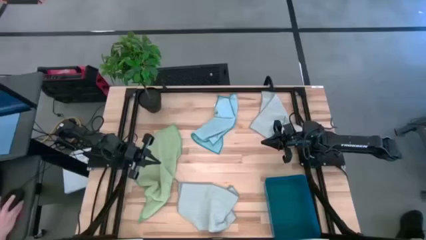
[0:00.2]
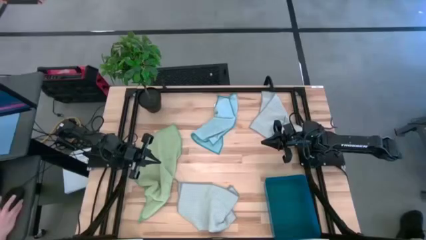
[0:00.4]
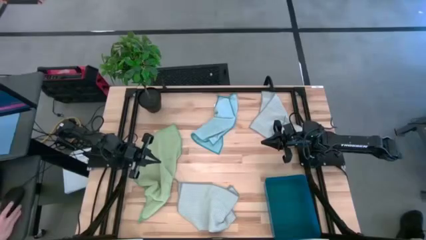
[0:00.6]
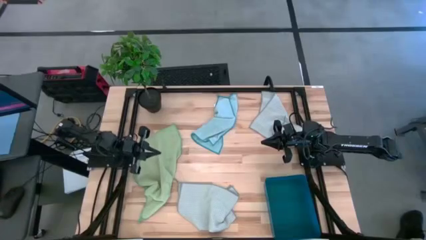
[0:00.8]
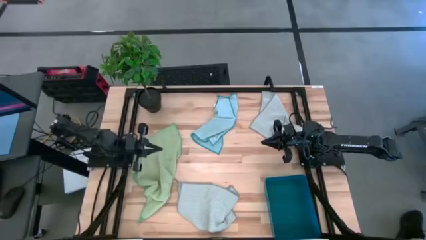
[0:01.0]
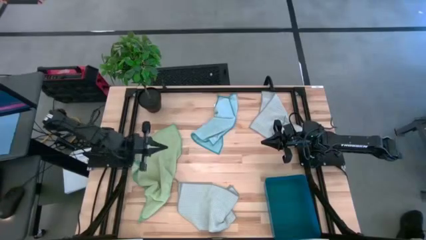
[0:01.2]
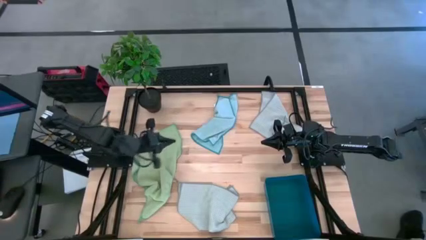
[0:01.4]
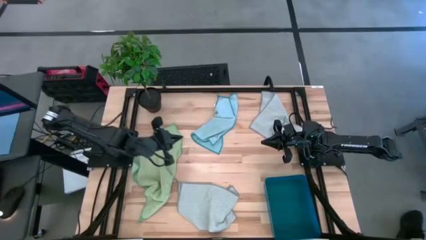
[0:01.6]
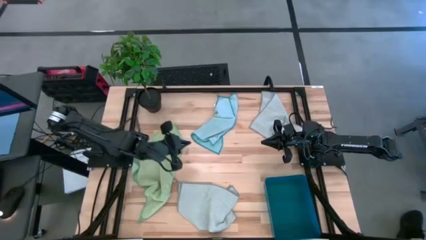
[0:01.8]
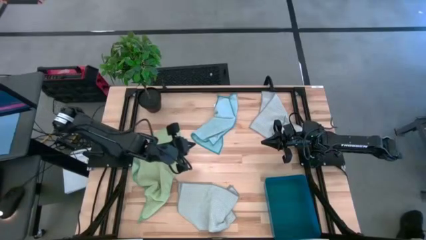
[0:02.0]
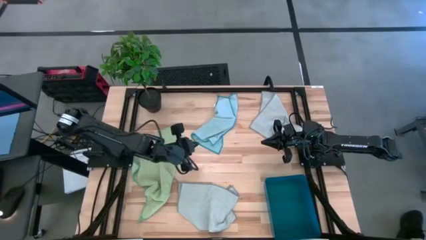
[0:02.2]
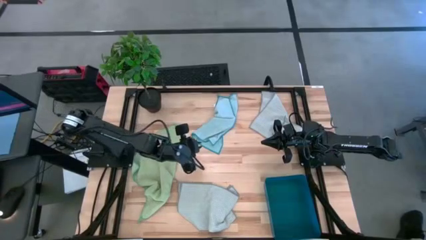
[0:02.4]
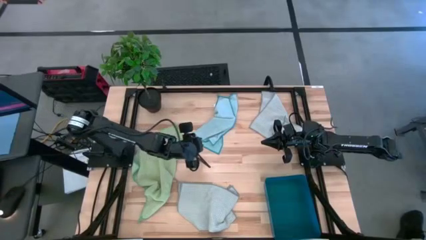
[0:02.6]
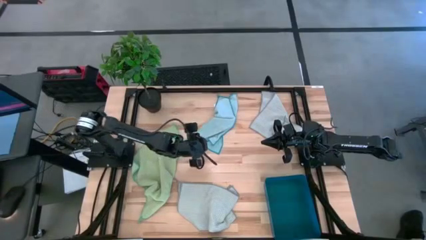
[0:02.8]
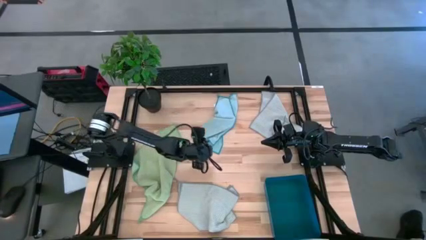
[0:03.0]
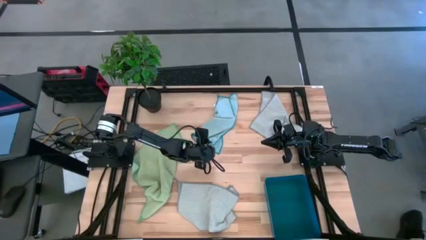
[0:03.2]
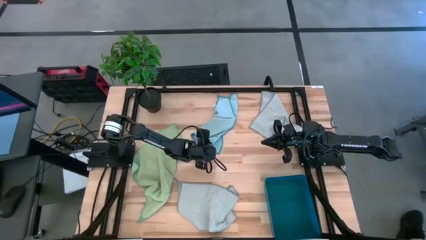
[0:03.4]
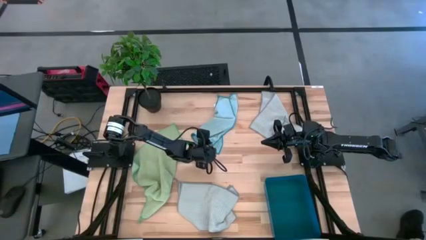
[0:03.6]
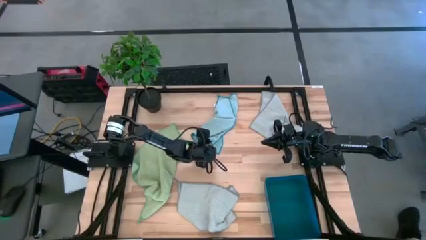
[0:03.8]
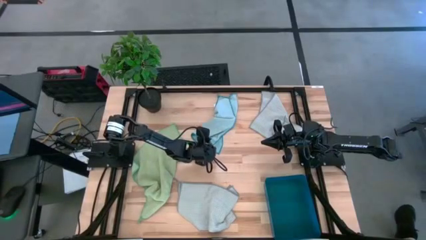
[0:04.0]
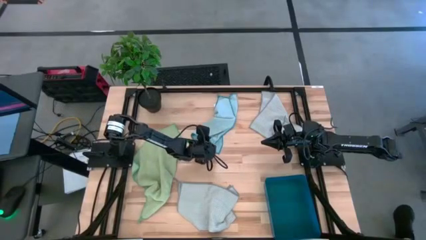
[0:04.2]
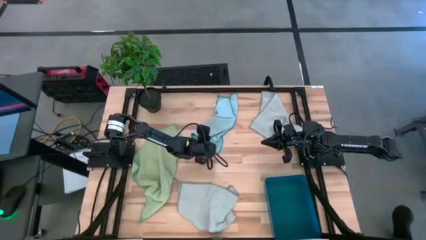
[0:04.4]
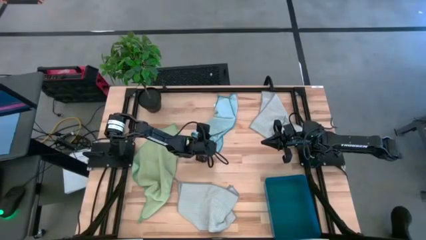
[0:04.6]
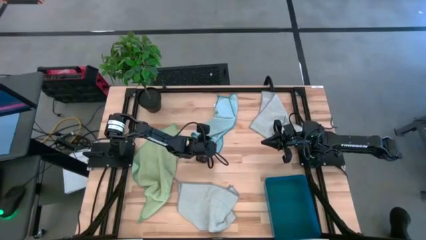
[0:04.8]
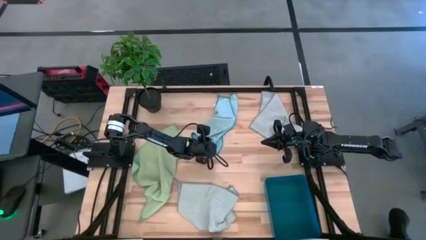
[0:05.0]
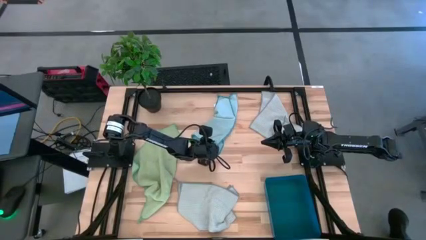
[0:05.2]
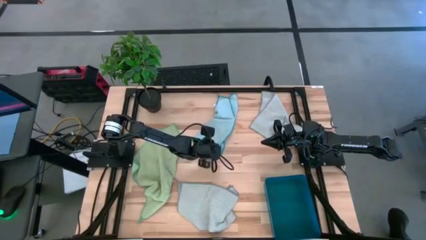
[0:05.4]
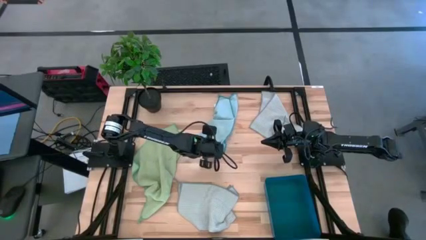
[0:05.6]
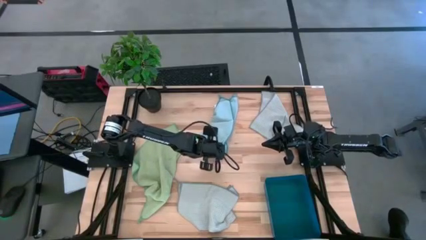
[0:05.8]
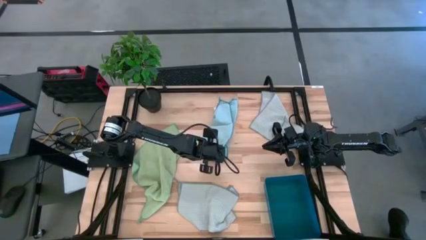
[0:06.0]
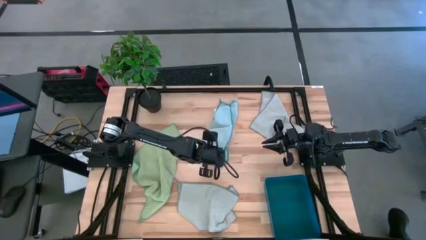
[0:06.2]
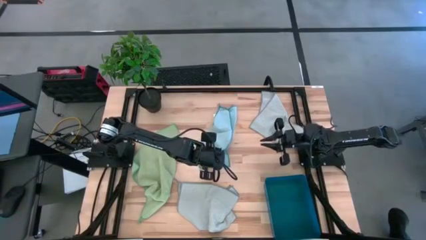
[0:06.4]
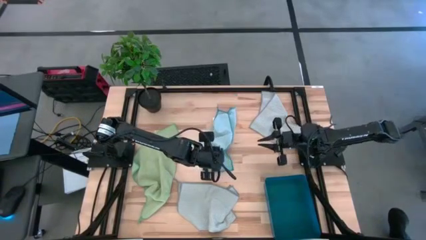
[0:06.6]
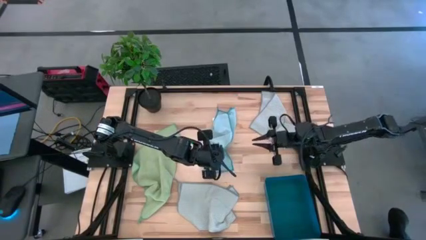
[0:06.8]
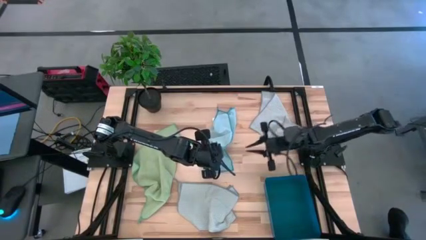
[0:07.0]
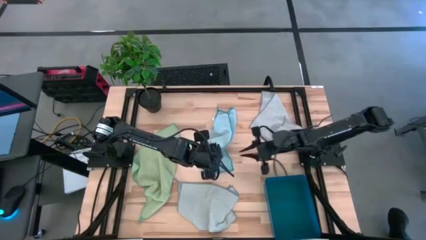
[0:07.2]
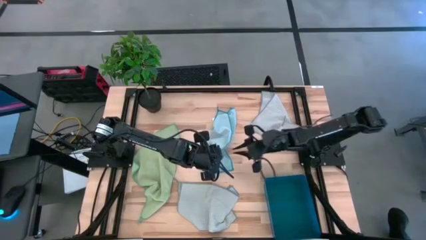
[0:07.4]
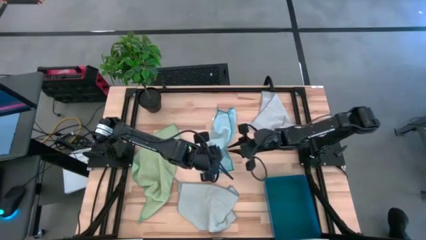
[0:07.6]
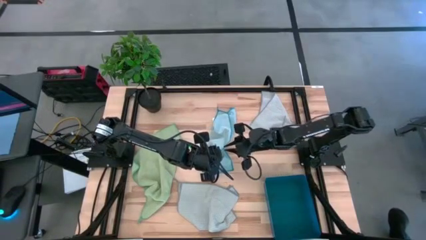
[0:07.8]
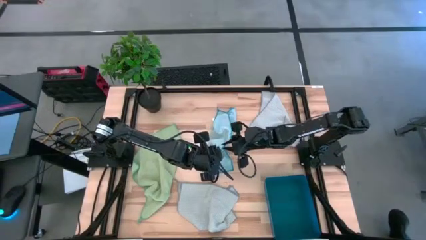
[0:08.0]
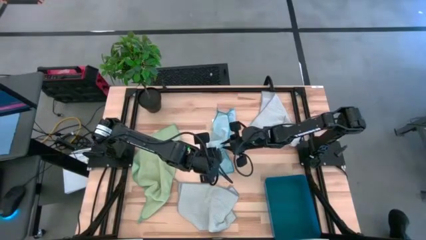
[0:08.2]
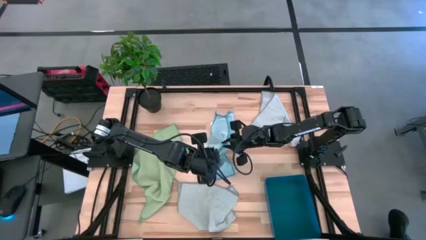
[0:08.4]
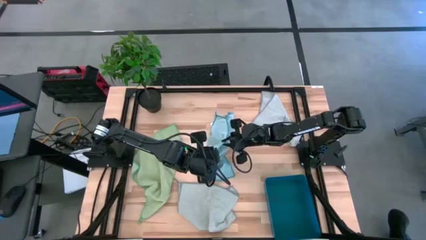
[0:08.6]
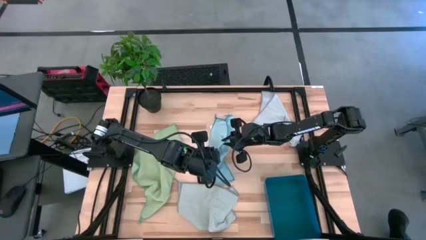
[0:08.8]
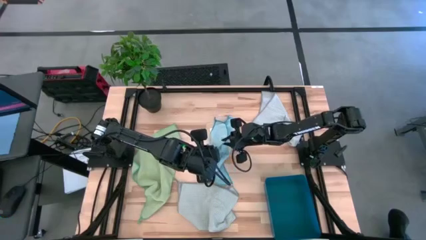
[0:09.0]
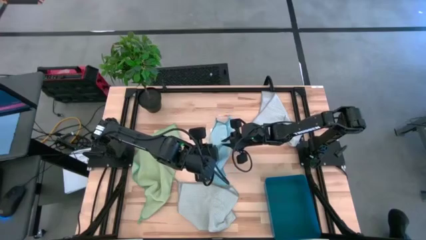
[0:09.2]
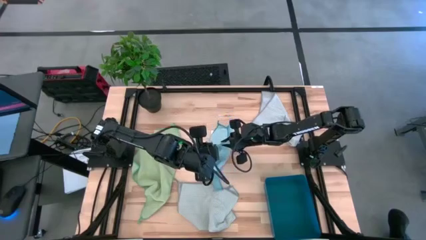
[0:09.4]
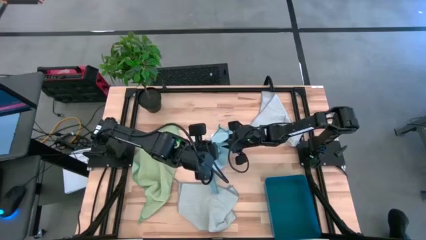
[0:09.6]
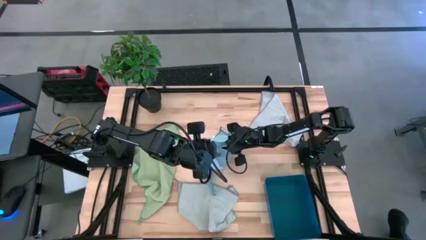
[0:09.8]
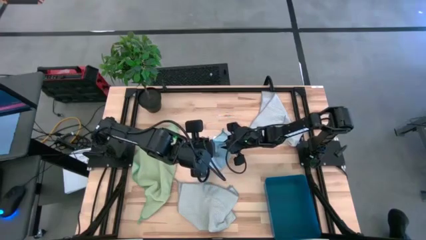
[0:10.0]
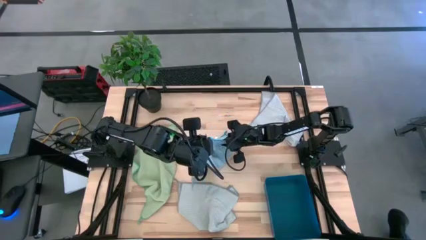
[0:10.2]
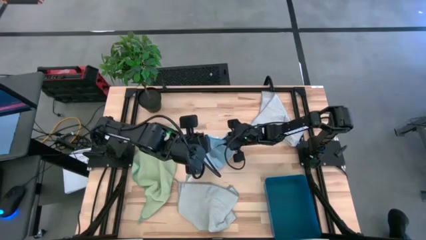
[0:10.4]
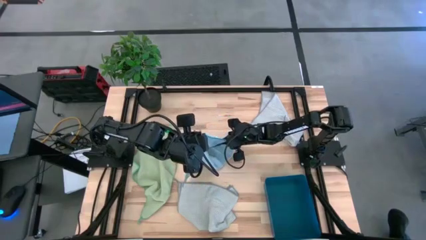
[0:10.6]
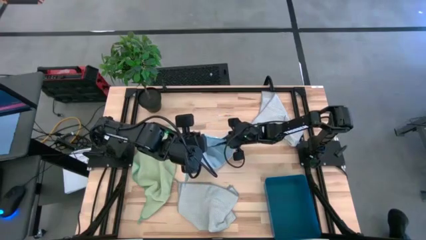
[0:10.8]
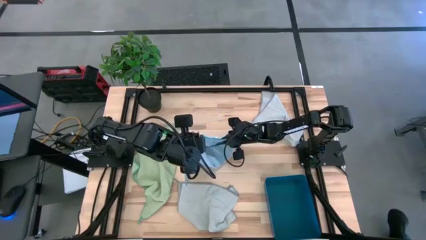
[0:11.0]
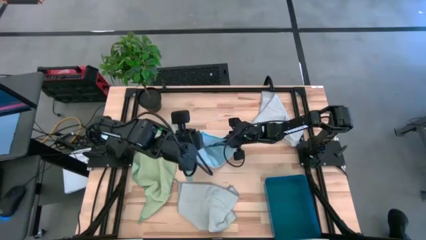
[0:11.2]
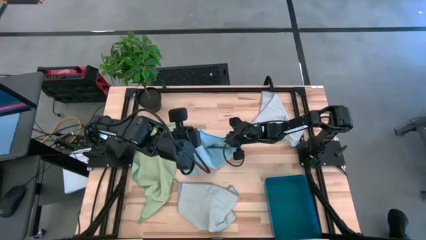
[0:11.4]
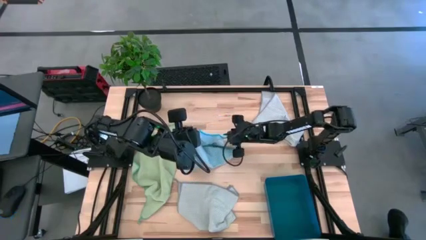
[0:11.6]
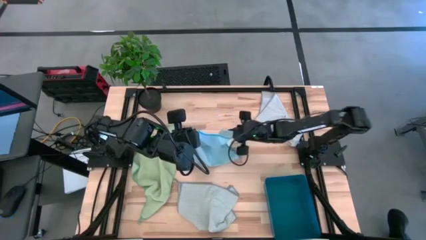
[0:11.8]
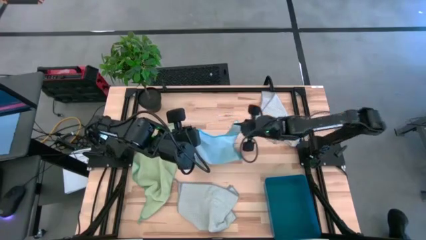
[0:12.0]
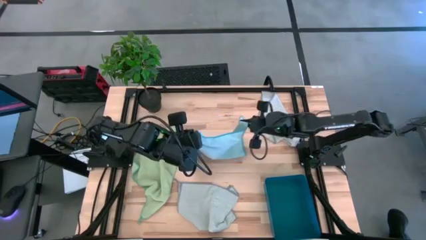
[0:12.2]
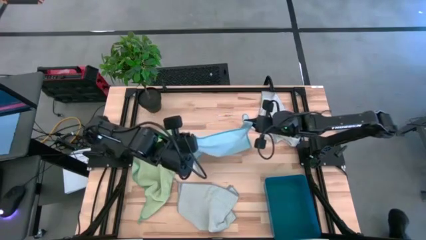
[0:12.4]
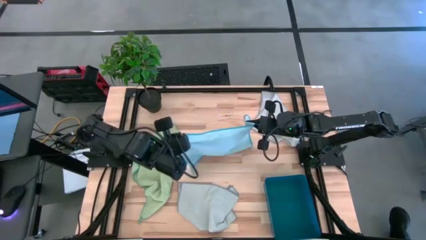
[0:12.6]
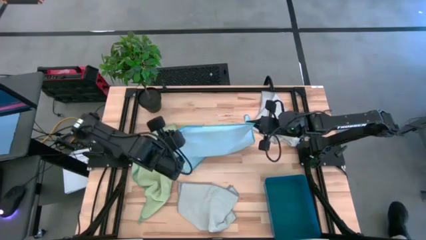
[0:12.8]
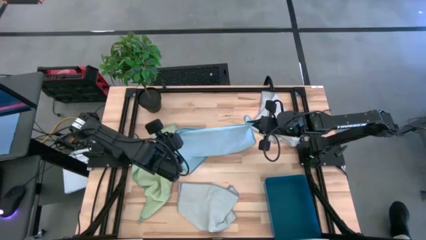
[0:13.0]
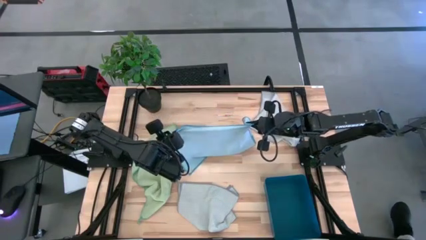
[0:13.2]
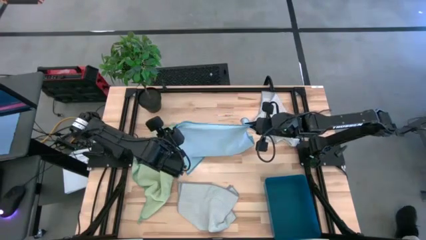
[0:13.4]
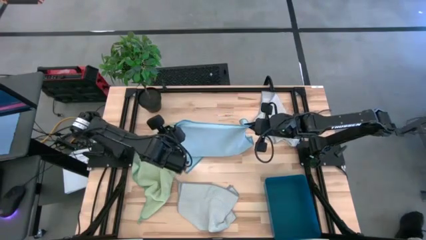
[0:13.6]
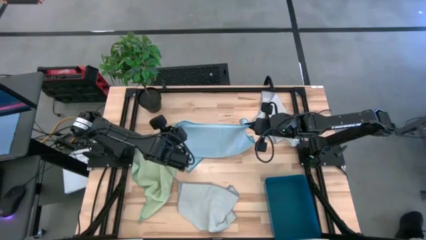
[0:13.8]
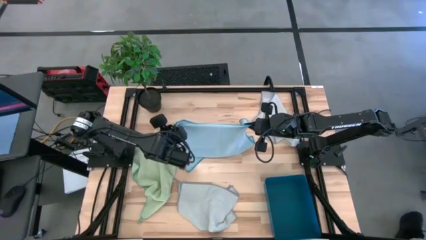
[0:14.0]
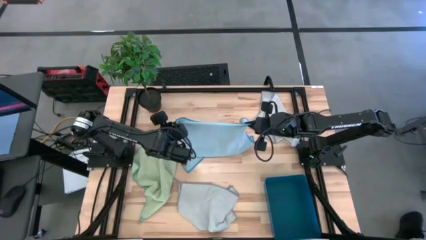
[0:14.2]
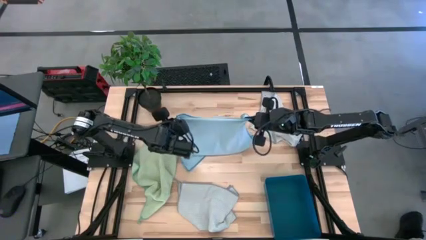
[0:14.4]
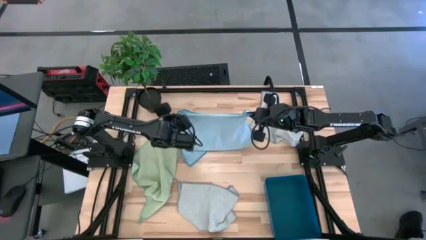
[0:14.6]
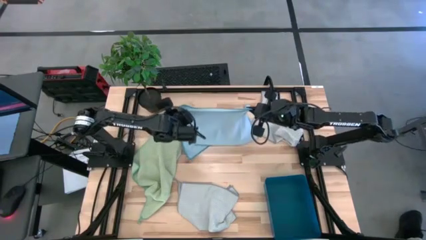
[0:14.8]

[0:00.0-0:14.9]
Task: Fold microfiber towels
Fold the blue microfiber towel
